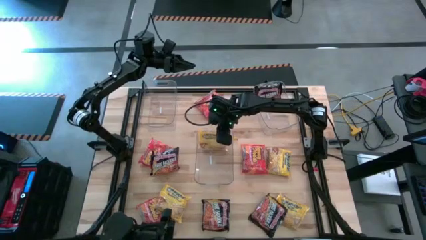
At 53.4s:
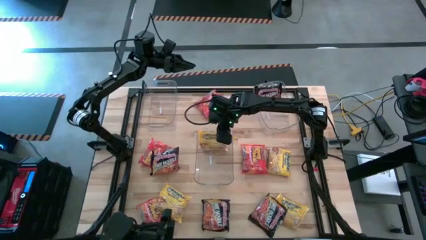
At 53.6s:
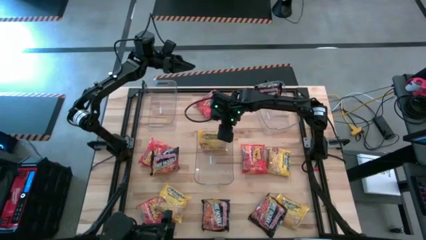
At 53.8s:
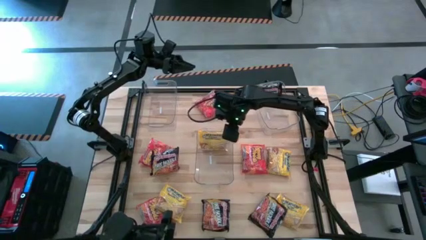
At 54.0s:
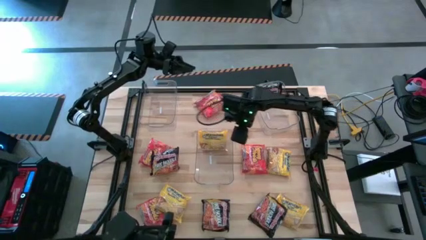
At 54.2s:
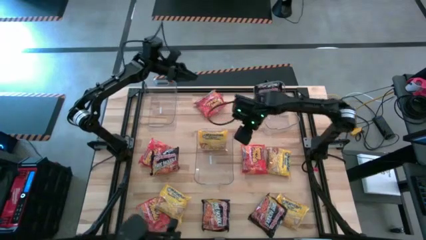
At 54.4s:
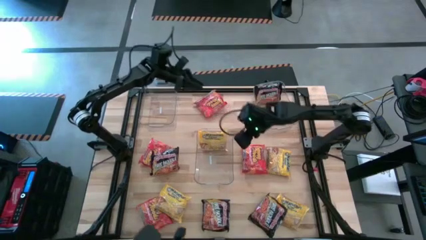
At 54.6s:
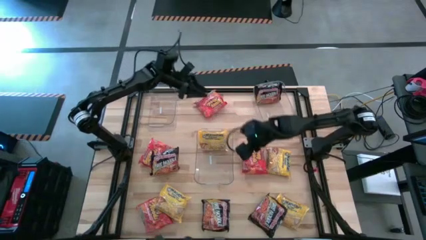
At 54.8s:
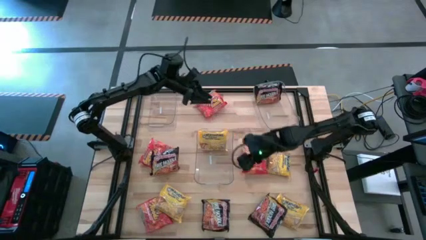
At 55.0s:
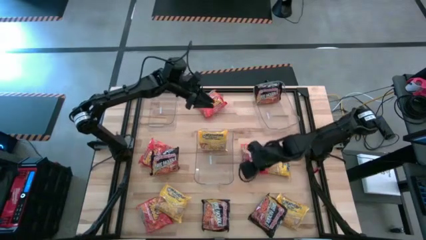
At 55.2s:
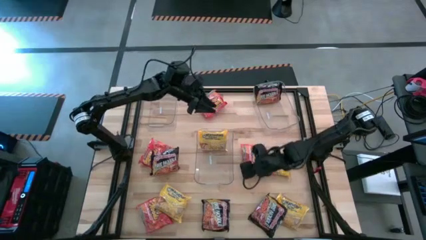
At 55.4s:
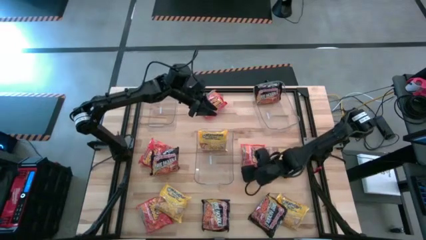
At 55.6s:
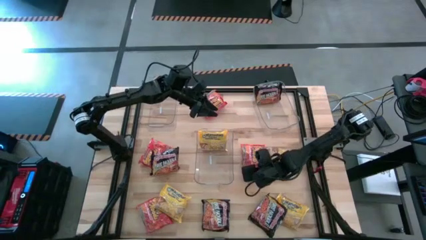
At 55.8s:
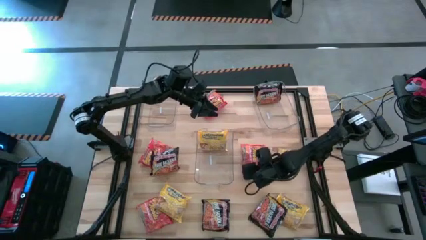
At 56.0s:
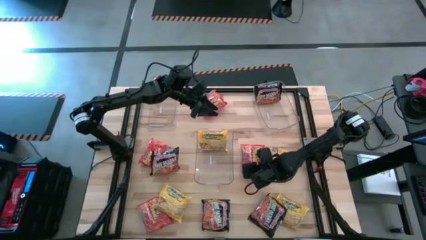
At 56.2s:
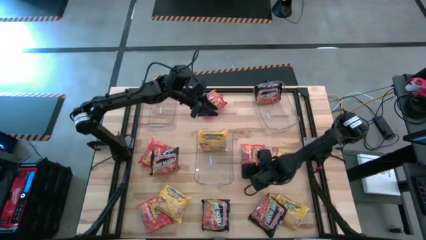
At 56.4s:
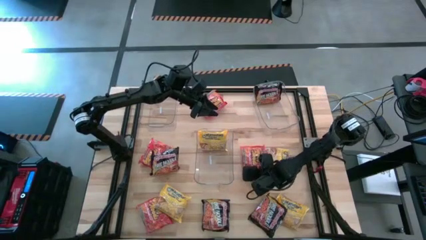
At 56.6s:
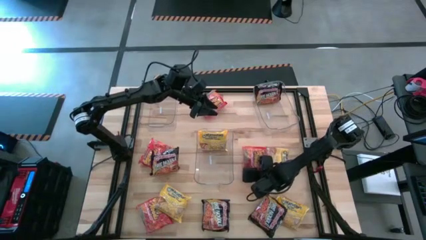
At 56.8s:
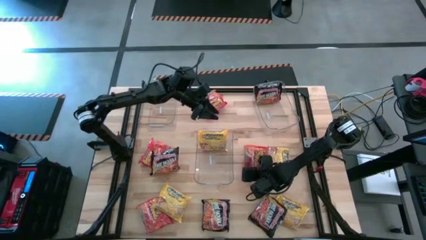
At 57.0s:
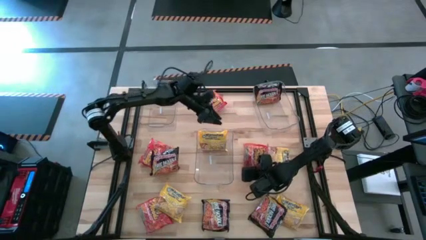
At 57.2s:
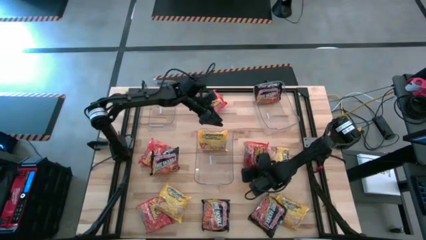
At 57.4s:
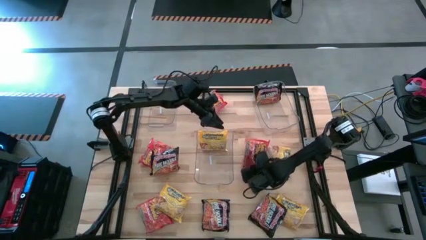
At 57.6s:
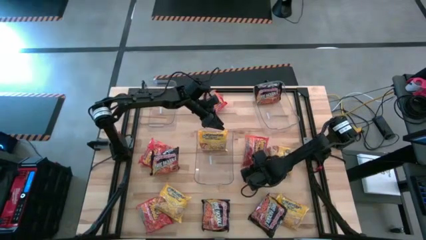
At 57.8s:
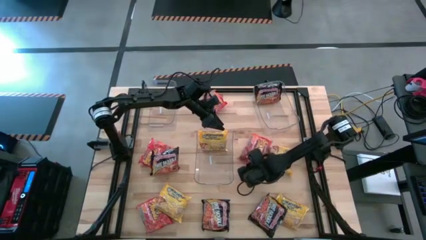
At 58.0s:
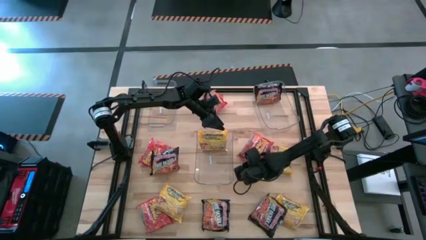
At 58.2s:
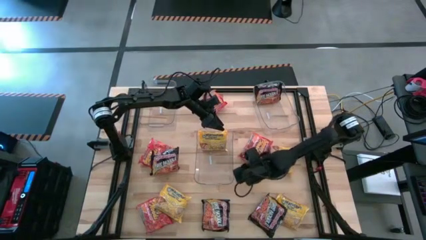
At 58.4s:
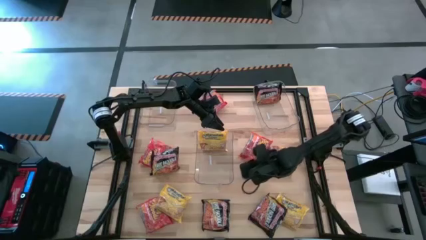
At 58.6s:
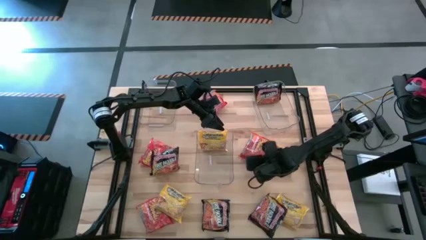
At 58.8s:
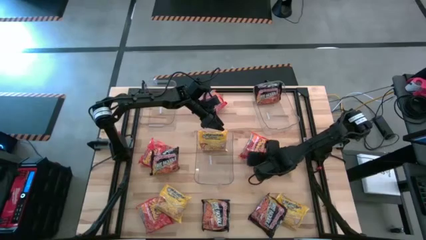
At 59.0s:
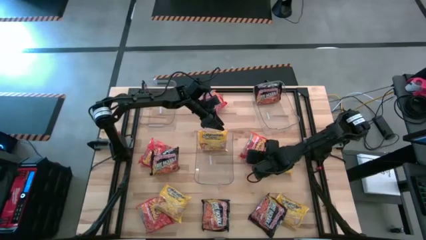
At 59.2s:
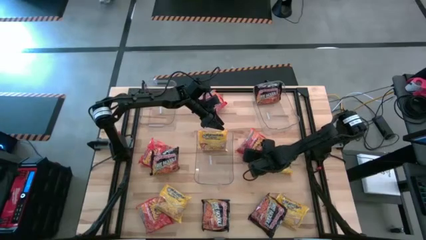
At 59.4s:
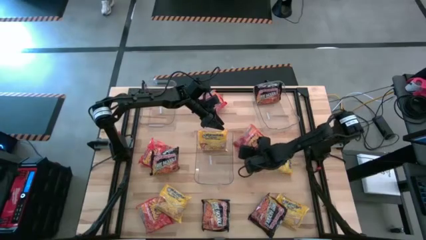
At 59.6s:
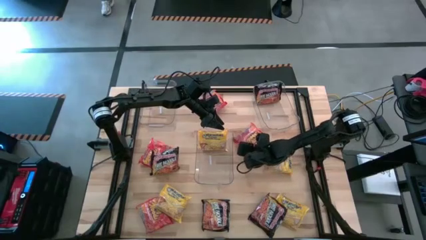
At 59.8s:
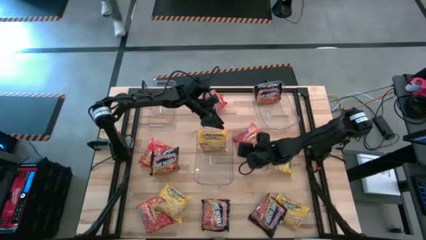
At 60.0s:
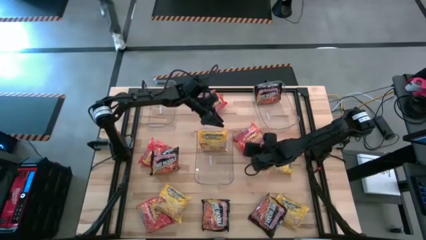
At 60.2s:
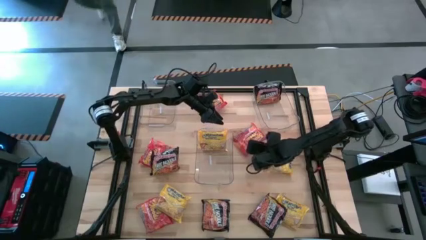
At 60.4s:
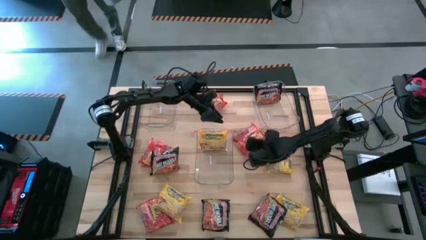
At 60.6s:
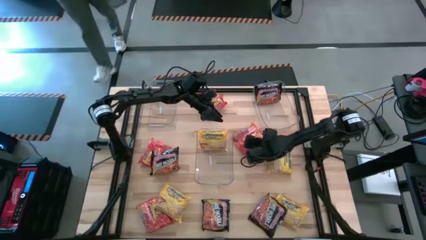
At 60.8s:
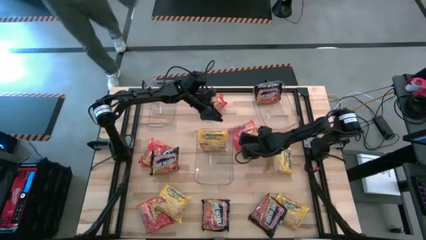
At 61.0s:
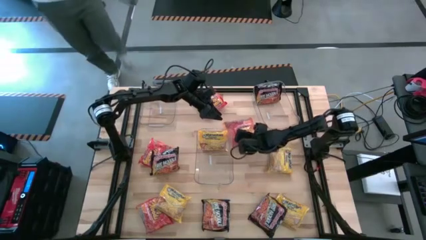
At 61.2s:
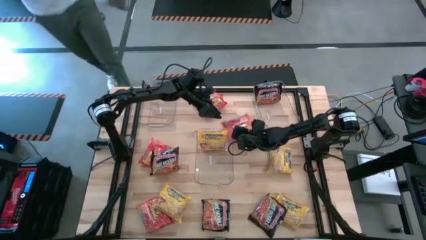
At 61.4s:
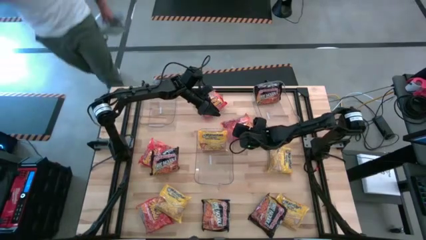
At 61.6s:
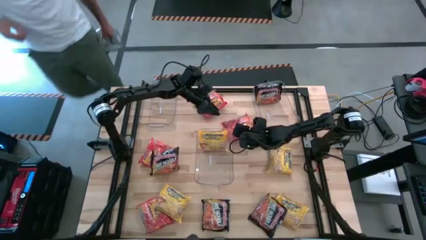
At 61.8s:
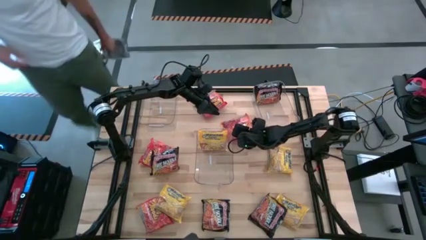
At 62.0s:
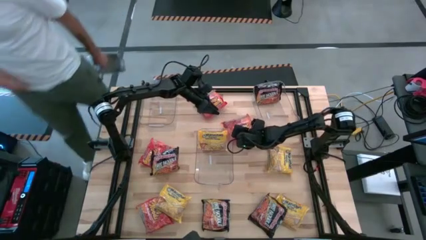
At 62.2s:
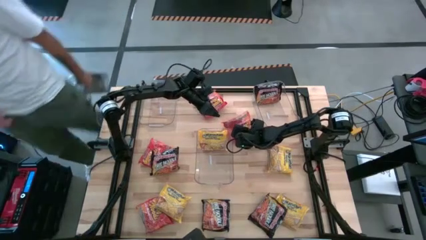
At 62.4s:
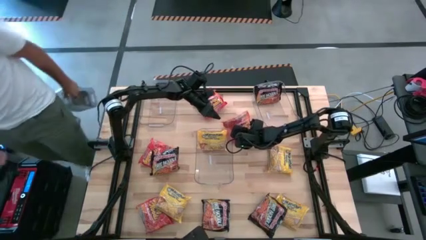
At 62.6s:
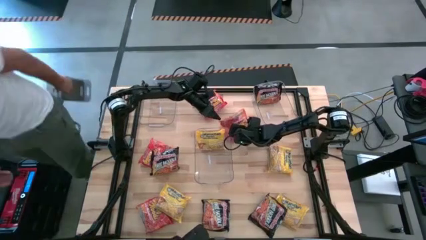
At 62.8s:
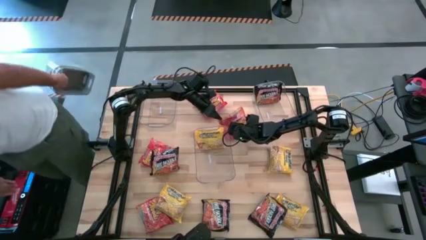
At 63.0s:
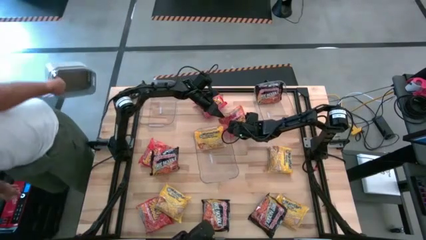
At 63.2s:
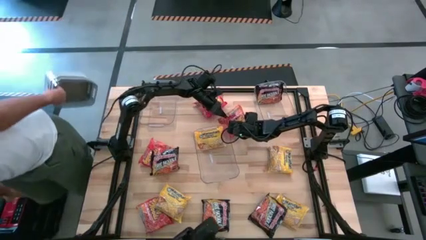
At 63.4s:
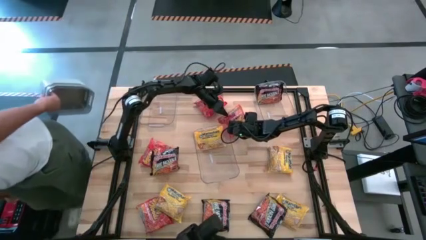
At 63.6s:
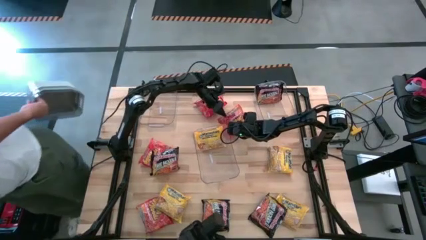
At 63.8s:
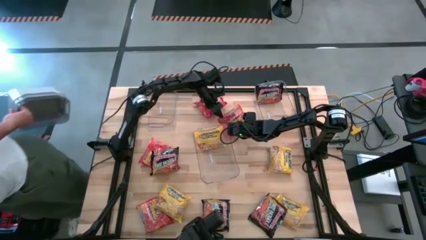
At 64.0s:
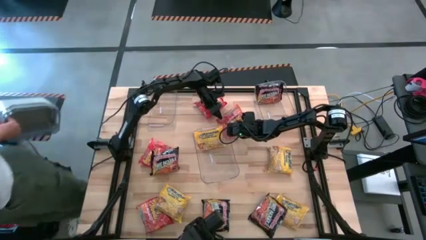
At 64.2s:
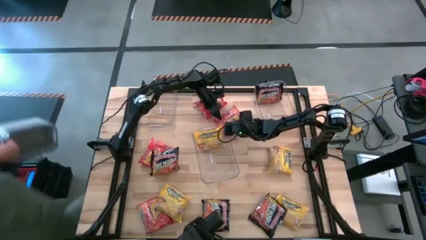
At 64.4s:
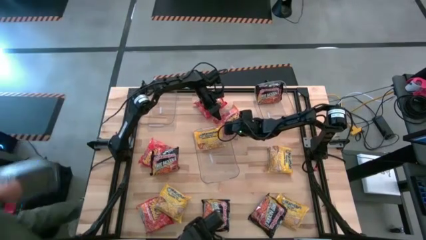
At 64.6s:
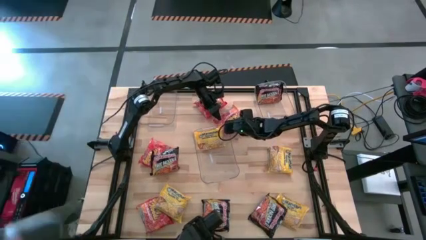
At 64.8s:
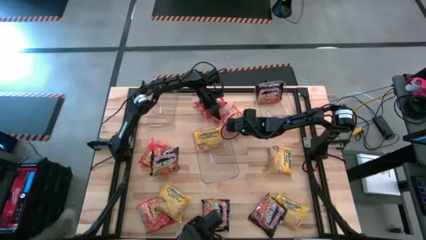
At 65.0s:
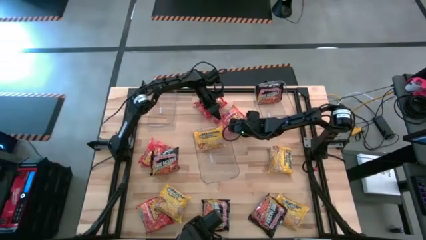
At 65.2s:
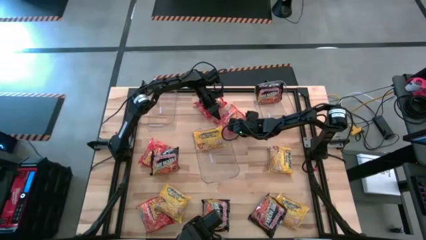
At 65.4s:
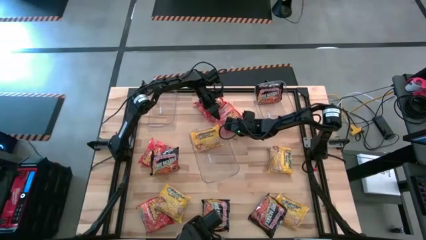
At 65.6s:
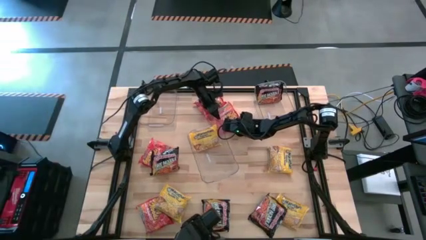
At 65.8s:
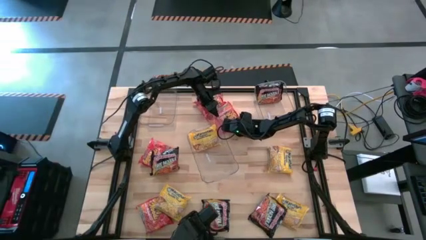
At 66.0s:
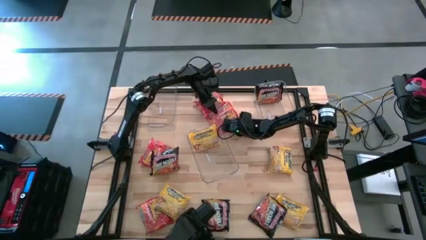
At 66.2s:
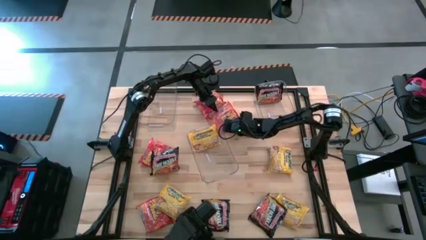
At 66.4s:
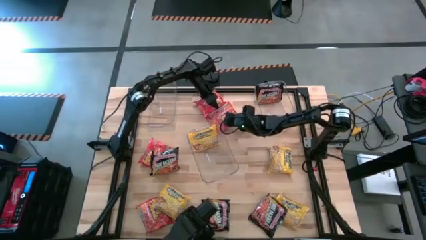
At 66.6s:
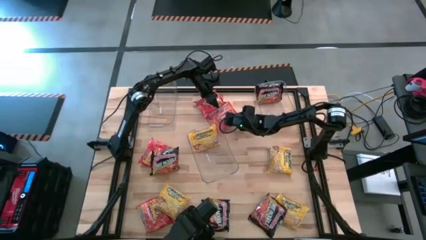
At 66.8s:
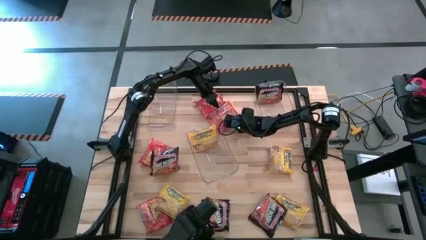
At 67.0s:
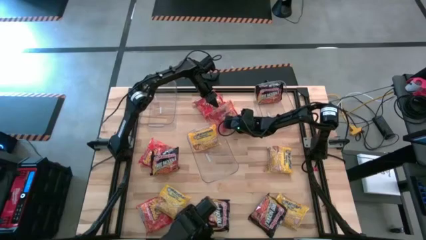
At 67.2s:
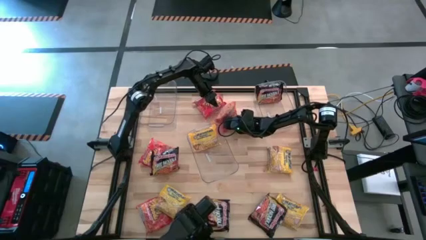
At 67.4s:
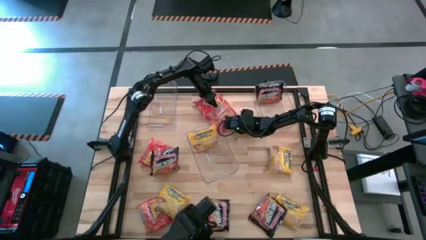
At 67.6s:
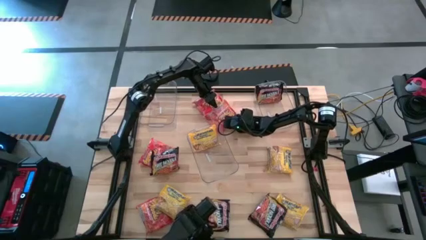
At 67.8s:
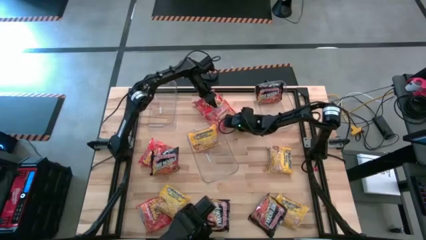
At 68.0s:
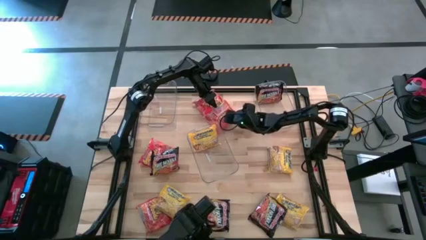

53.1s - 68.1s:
Task: Sort Maruchan noodles
Put the orange noodle pack into the top left transparent bin

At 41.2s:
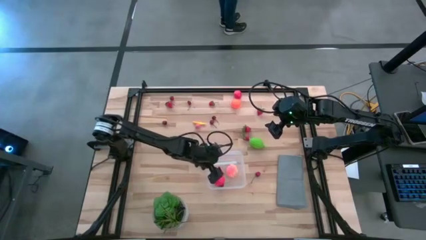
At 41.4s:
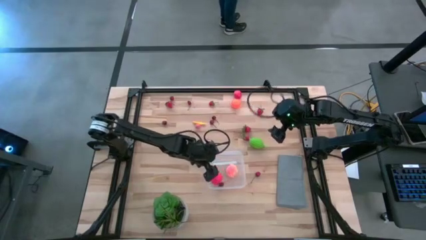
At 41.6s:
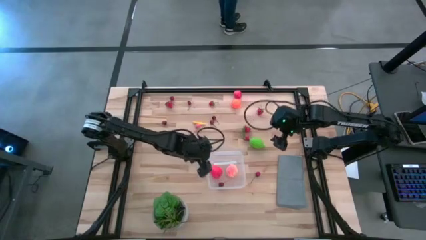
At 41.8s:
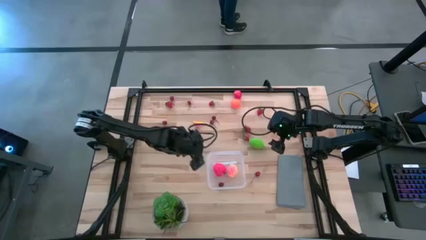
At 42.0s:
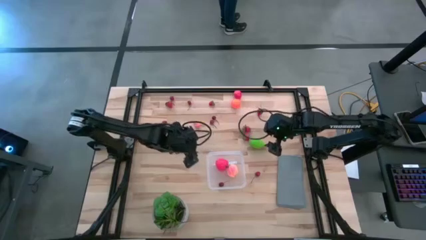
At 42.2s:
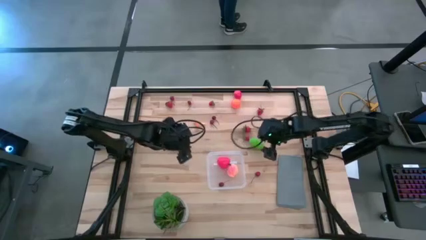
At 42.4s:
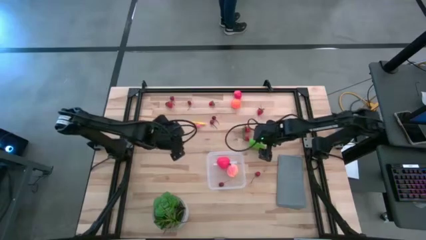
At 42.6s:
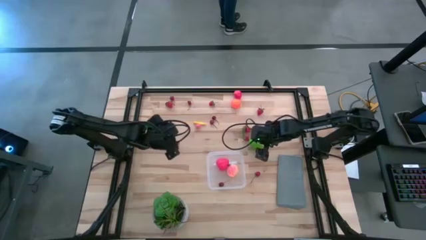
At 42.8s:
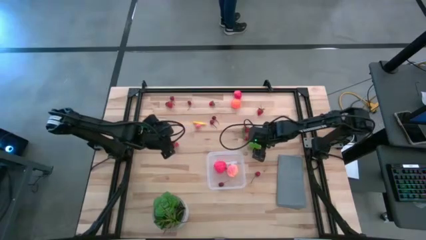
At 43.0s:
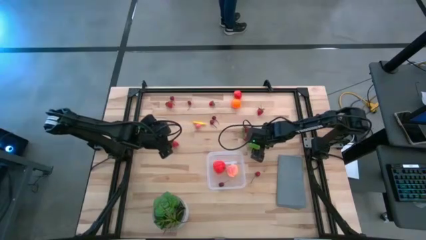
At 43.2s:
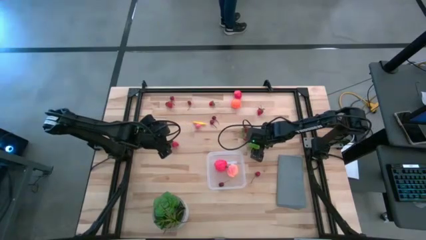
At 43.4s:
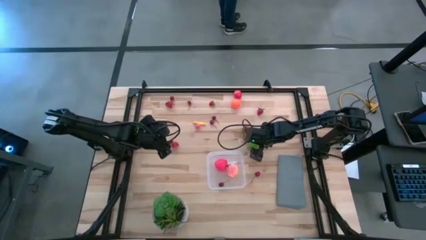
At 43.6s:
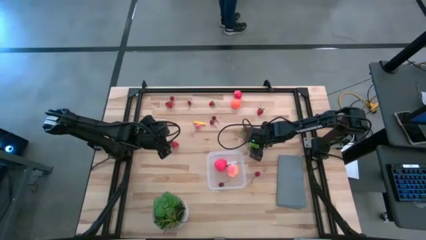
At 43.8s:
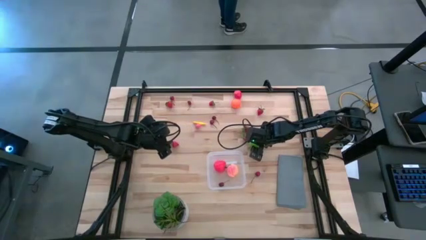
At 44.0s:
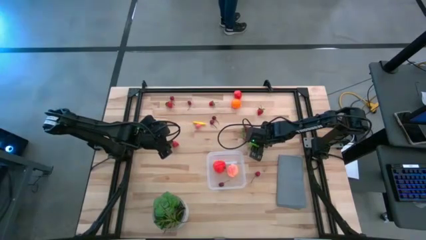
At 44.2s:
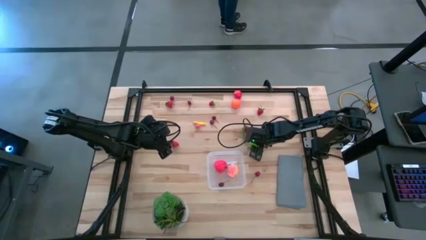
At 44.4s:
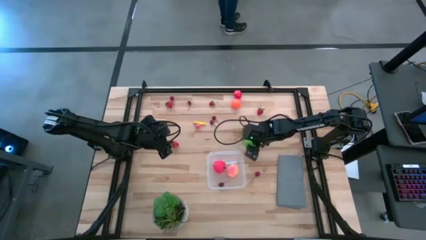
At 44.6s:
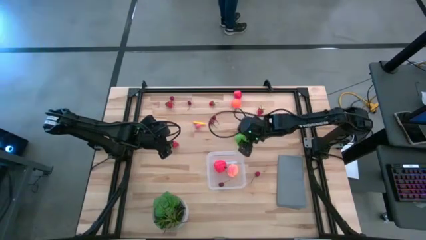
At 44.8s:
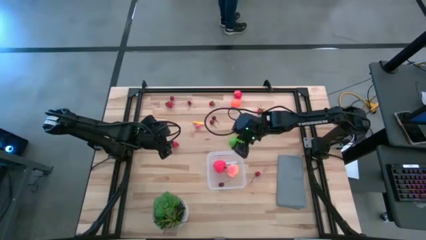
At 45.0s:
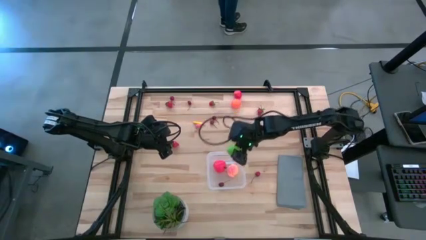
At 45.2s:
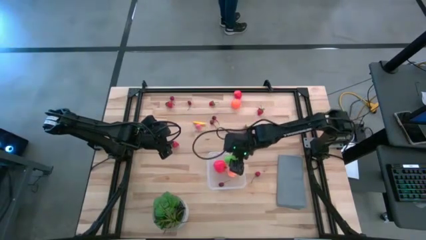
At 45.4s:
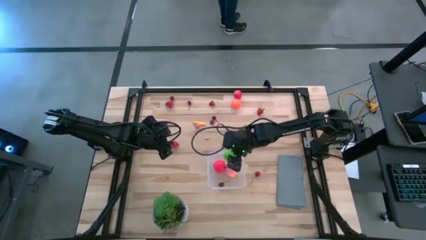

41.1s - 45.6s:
Task: Pick and placing Produce into tupperware
Put the green melon into the transparent bin
